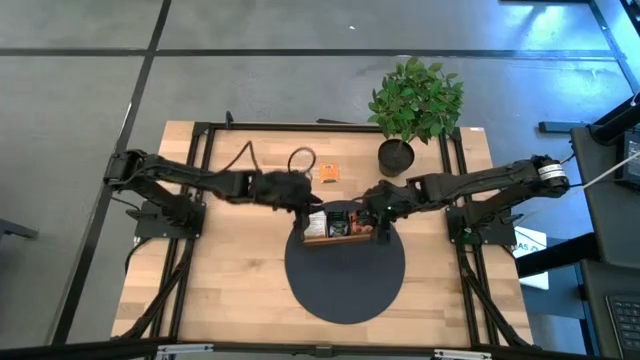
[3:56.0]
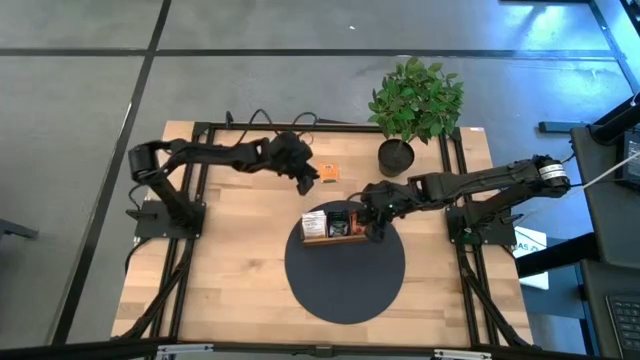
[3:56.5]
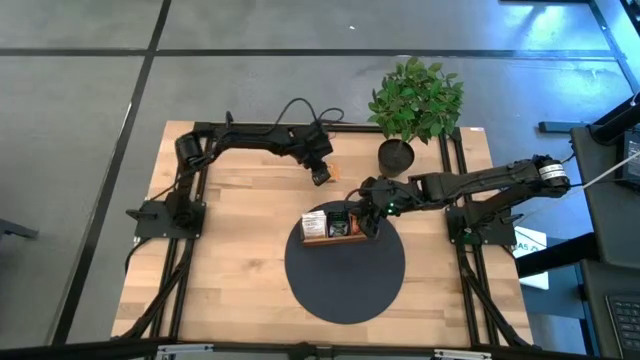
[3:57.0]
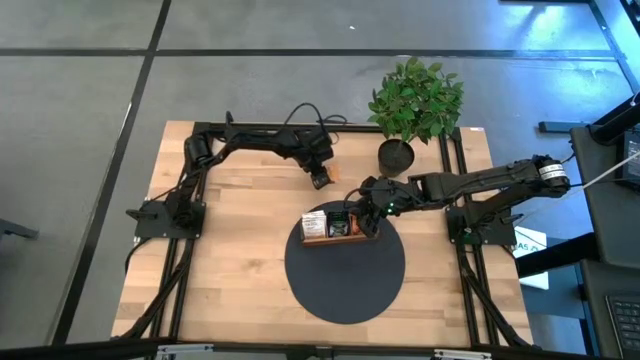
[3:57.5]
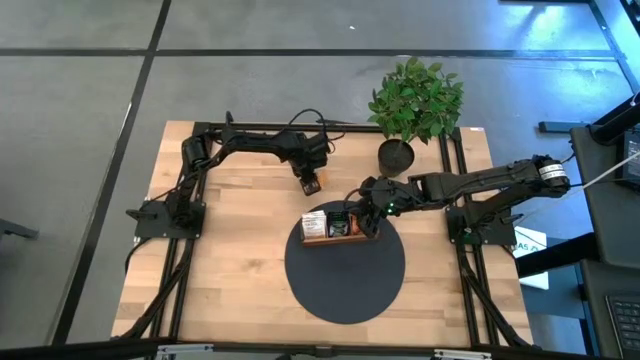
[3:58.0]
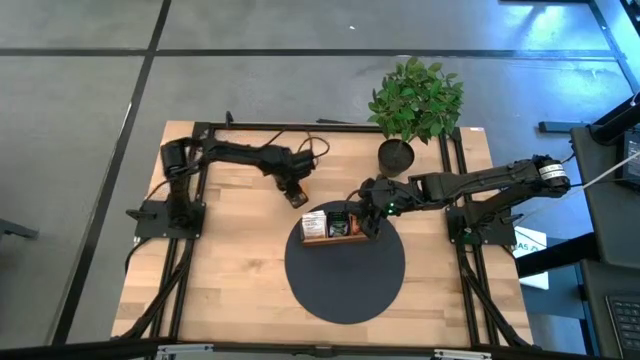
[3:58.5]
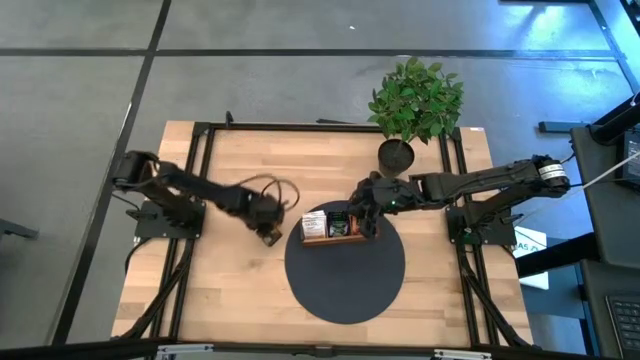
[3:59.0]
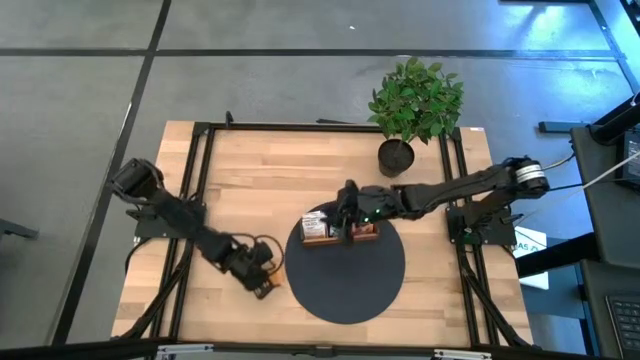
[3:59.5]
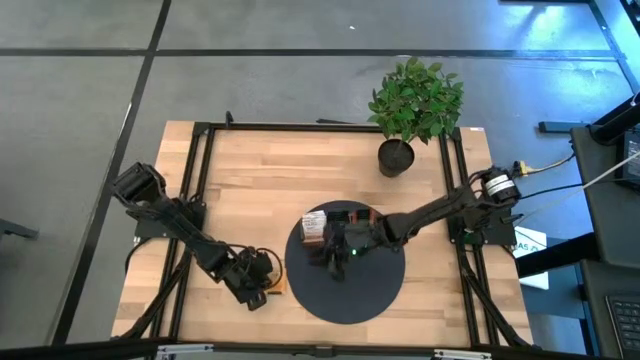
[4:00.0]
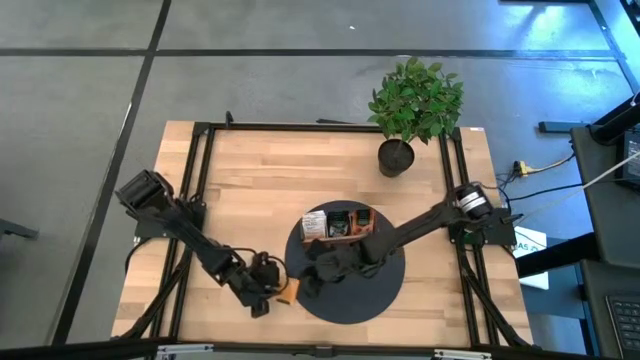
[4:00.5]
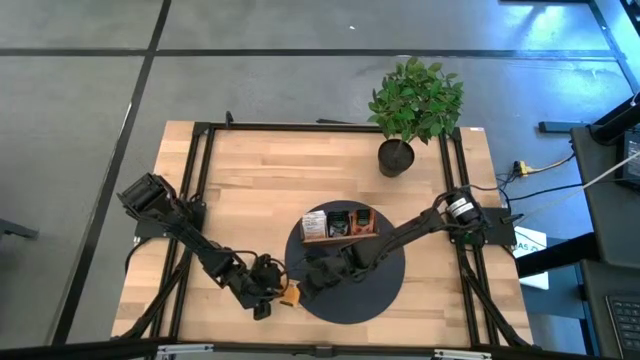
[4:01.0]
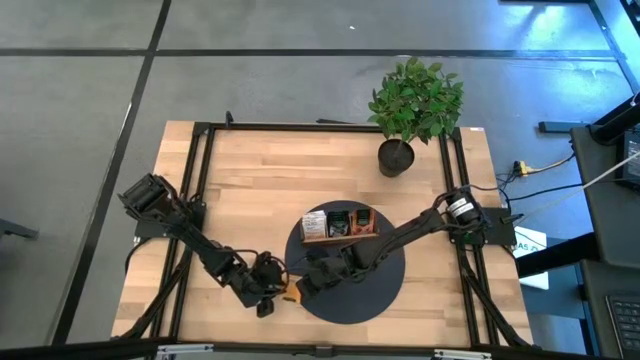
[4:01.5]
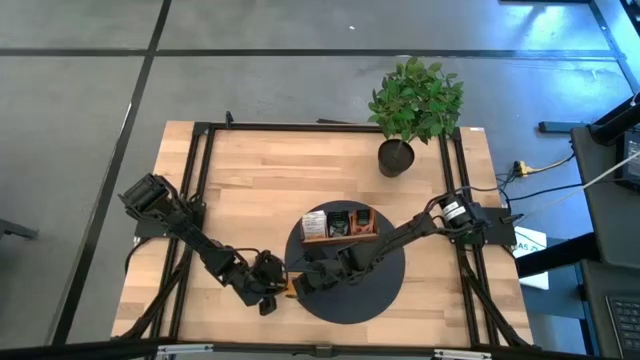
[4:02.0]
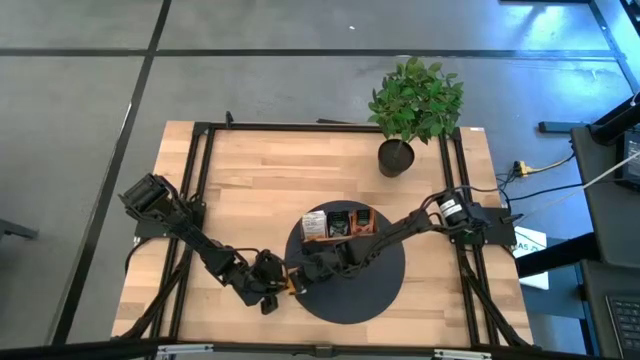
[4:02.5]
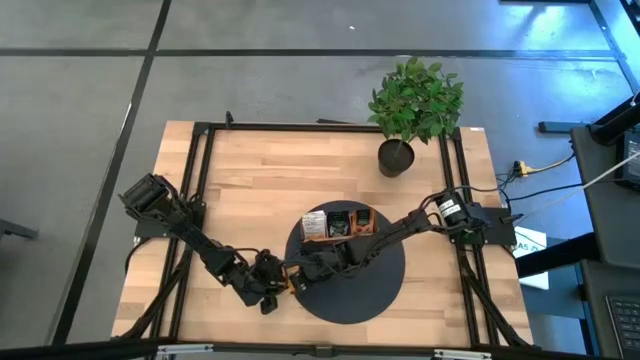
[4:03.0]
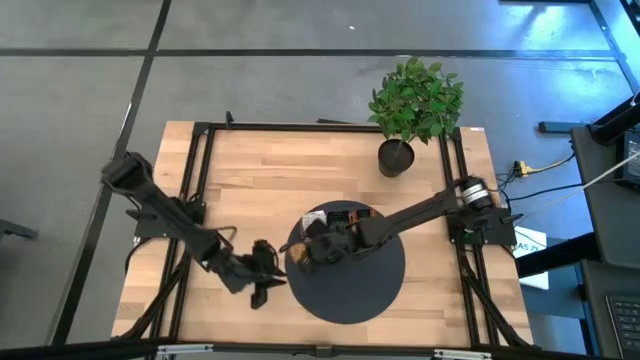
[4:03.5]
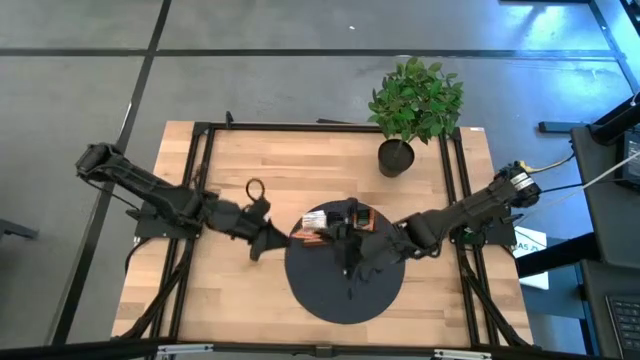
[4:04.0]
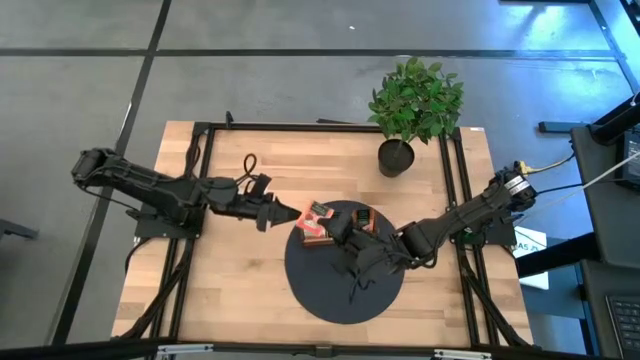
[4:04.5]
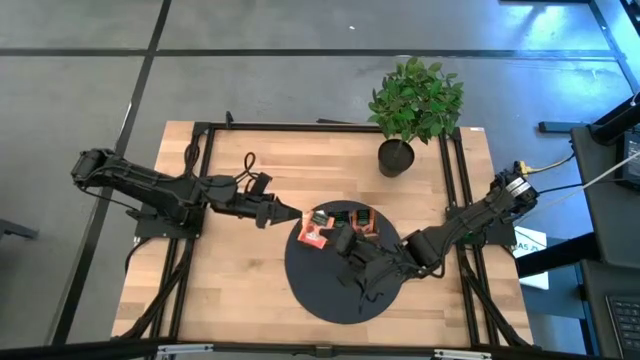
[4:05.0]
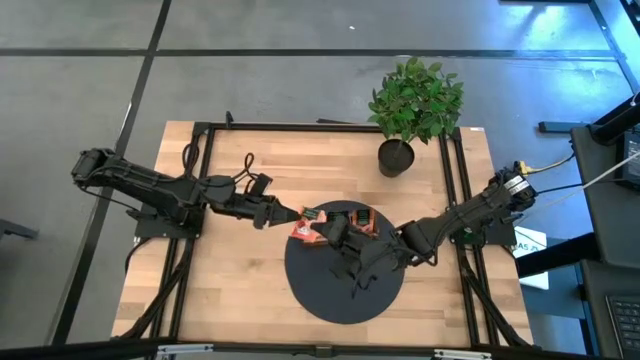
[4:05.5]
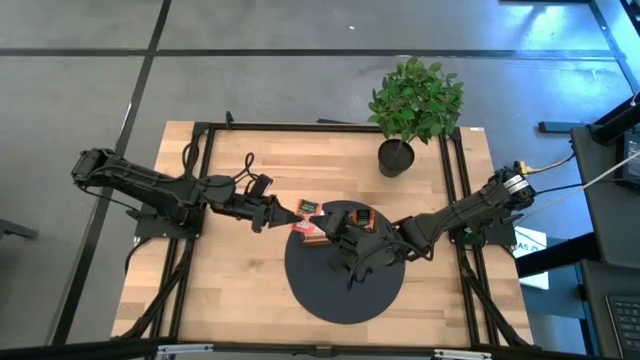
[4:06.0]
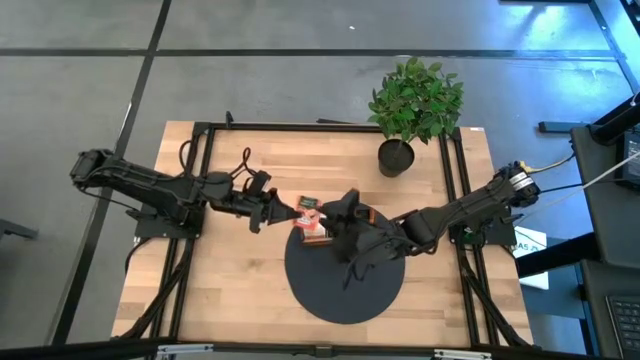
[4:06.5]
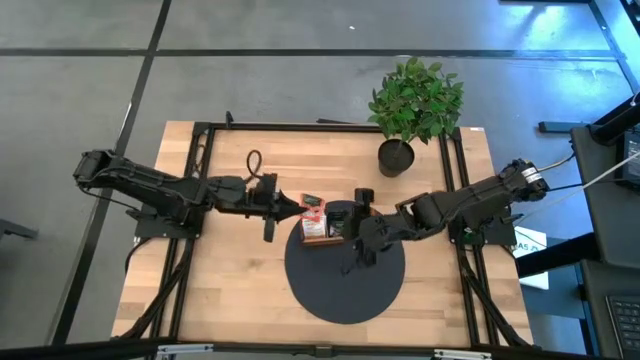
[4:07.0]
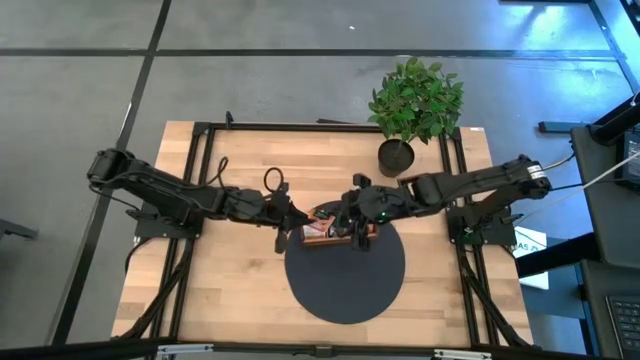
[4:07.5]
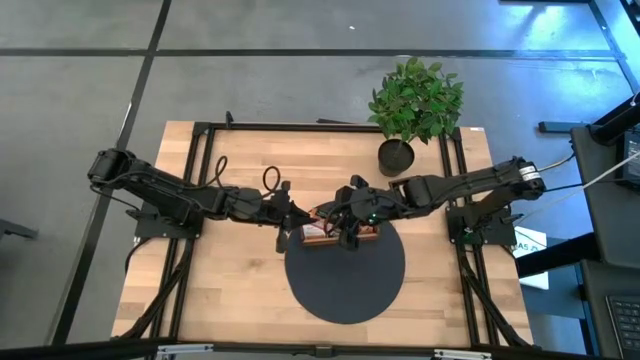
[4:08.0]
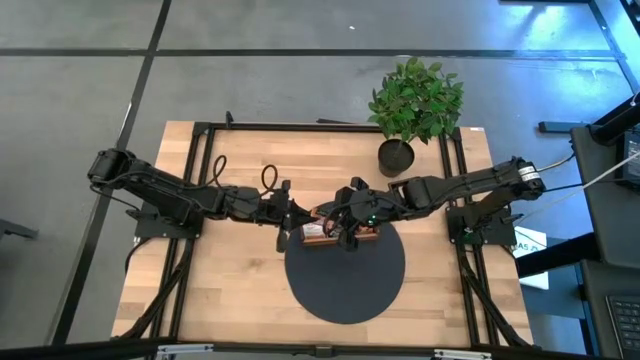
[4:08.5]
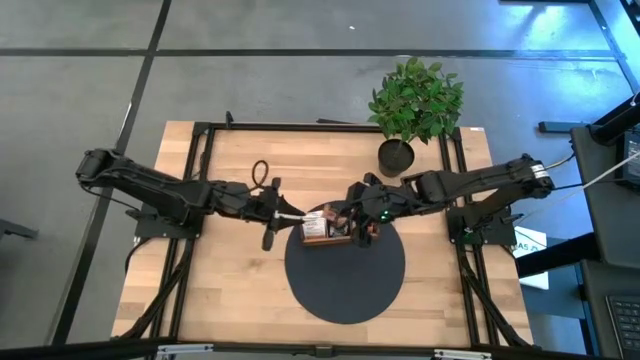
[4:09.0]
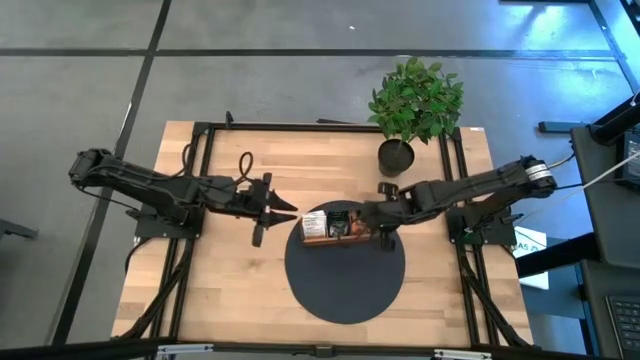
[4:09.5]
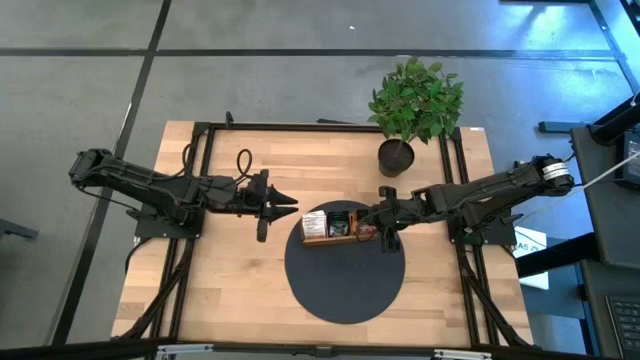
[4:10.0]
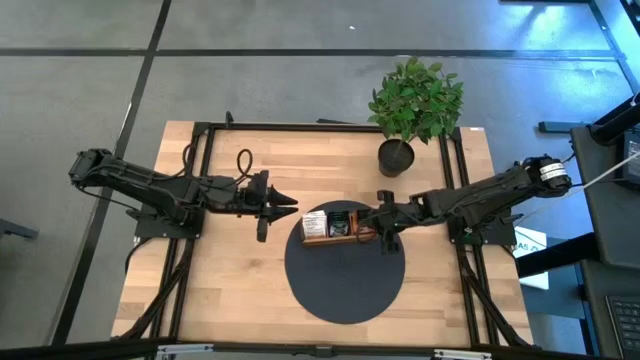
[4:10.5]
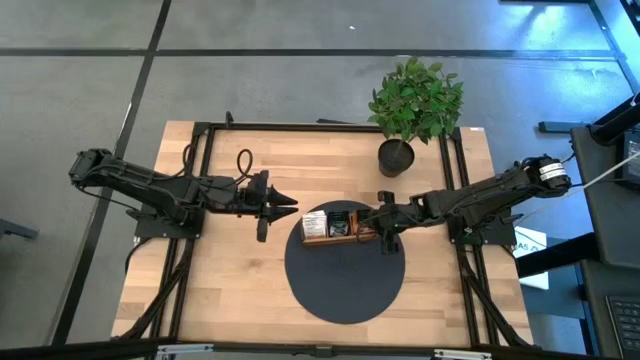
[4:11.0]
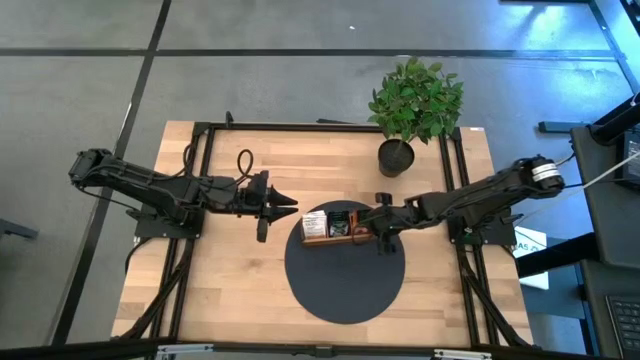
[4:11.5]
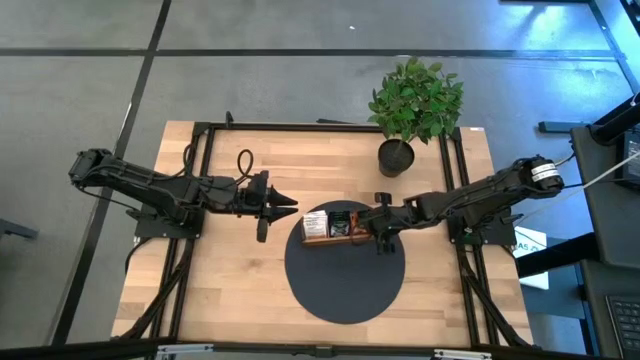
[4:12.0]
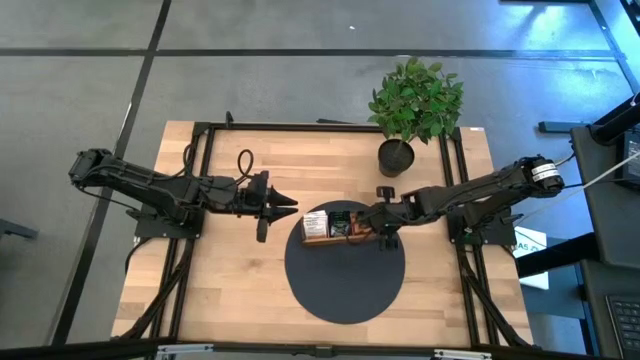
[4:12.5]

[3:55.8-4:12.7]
Task: Pick & Place Tea
Put the orange tea bag into the right section of the wooden organizer

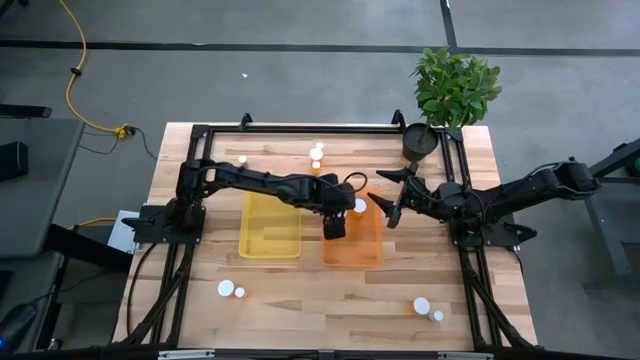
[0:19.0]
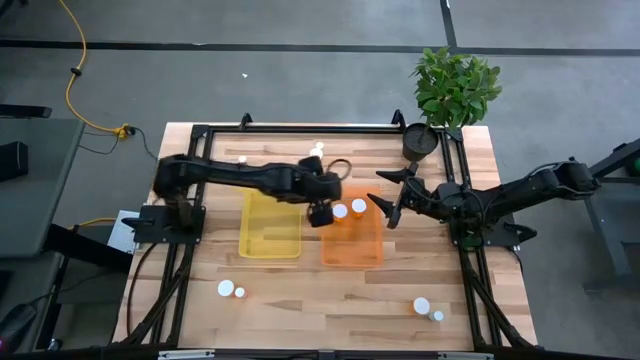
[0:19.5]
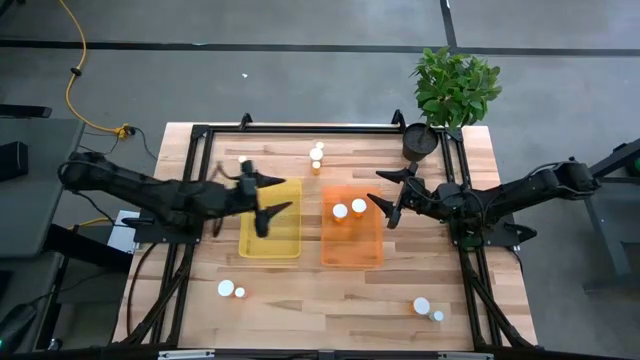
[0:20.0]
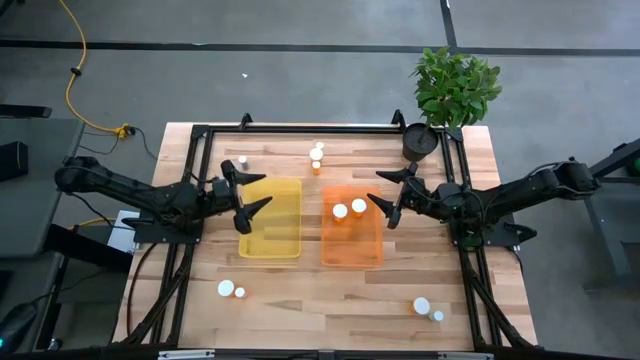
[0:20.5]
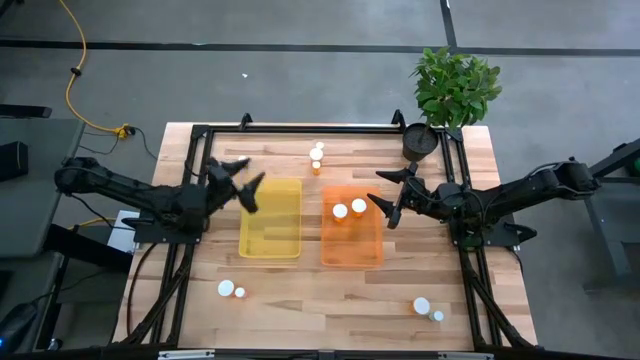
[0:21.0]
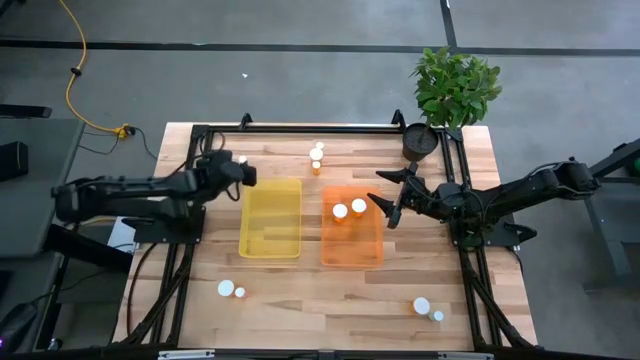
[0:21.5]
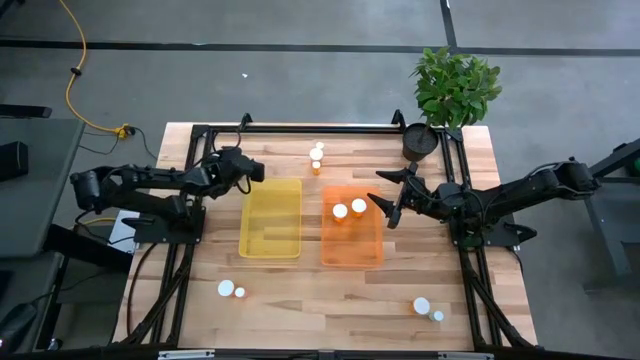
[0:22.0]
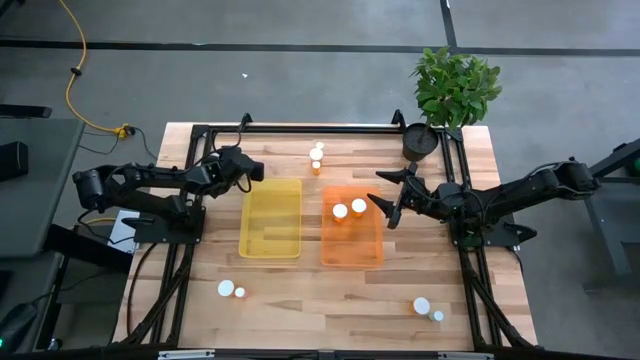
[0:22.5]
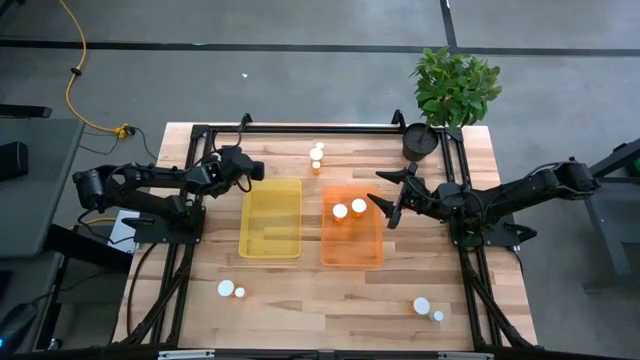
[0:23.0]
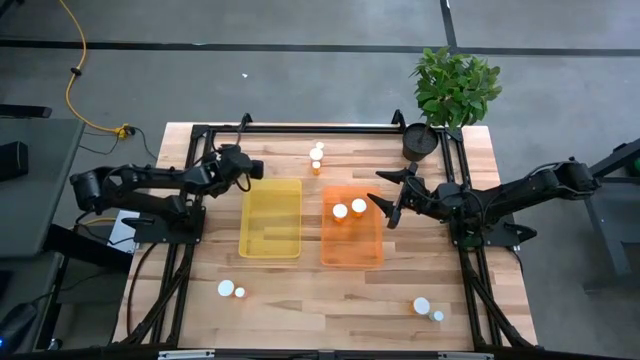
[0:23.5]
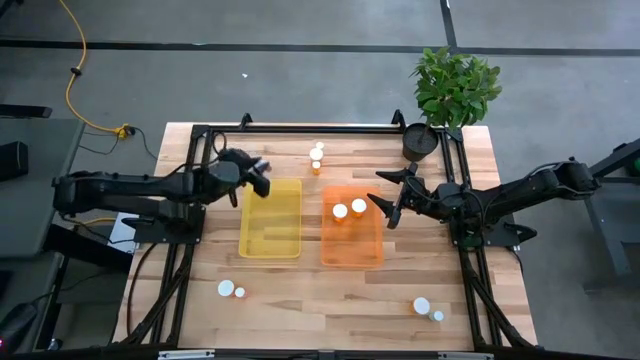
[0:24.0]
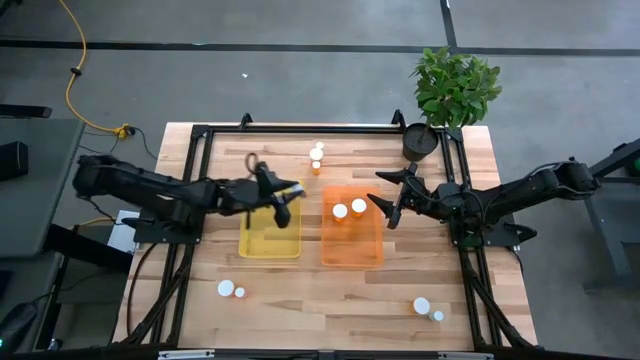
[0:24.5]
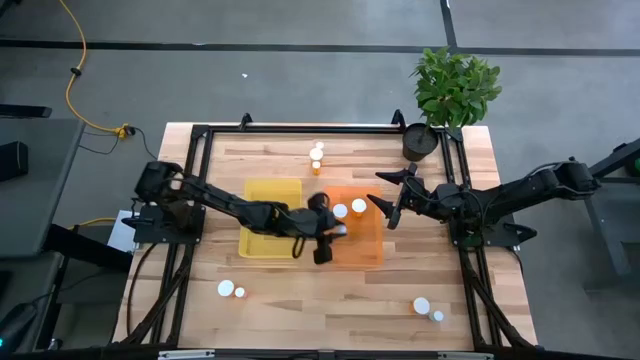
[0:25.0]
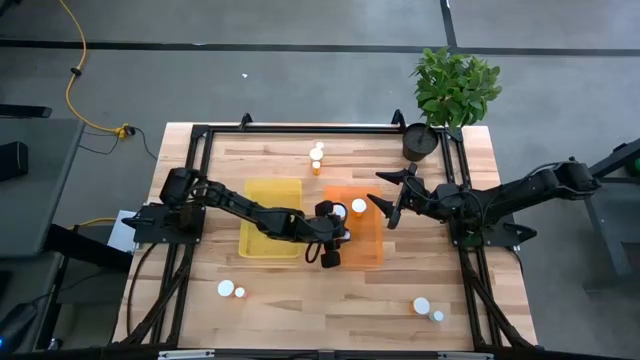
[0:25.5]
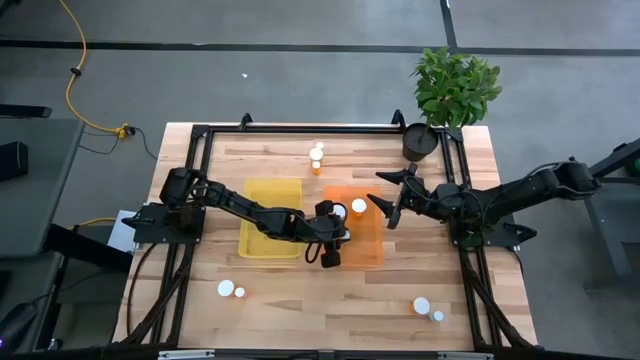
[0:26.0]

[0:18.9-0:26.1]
Task: Pick and place medicine bottles into bin by pill shape (circle, oval)
Put the Orange bottle pill into the orange bin
